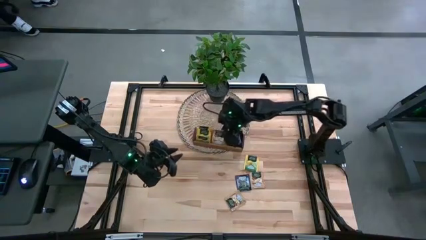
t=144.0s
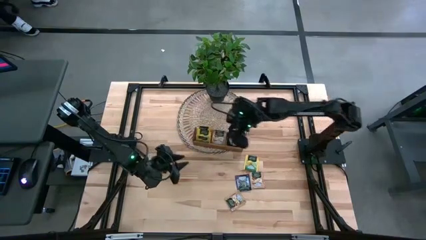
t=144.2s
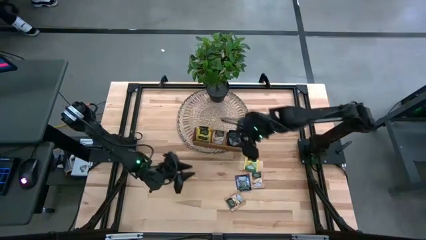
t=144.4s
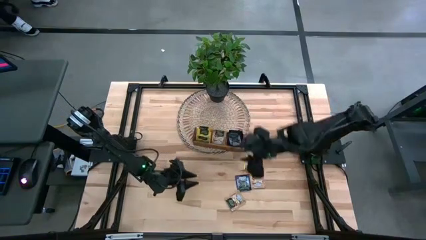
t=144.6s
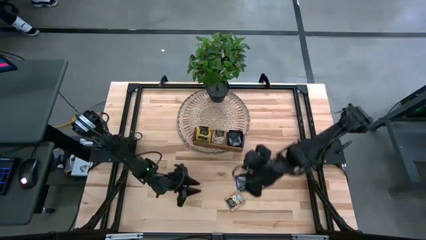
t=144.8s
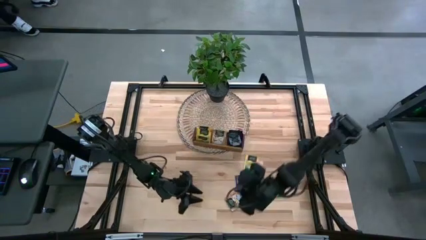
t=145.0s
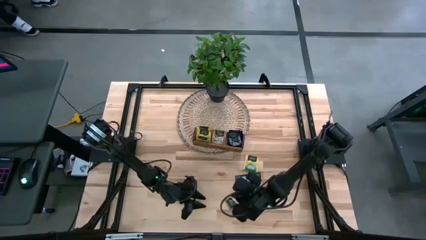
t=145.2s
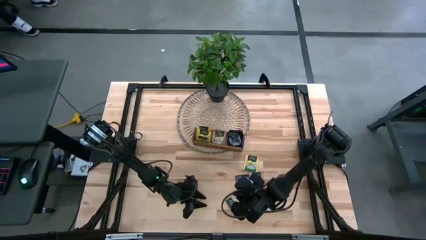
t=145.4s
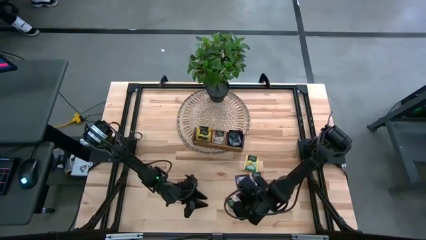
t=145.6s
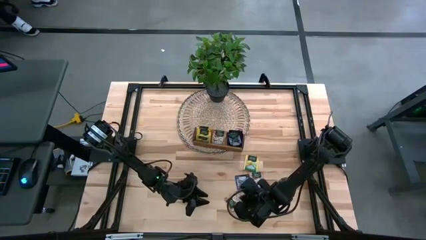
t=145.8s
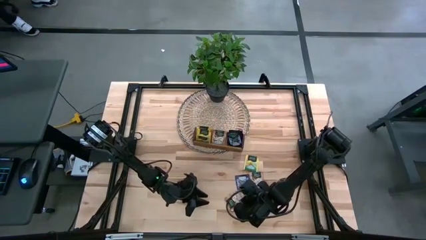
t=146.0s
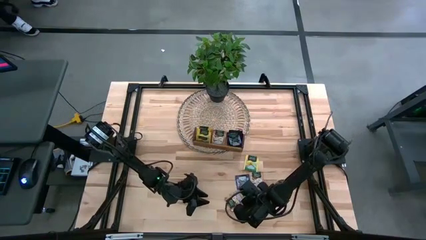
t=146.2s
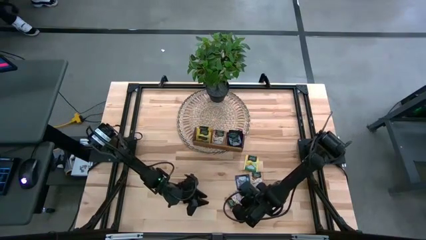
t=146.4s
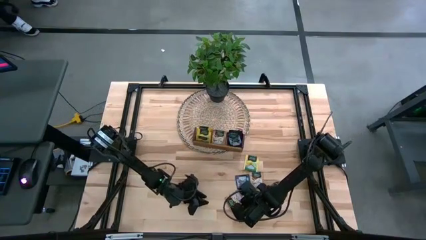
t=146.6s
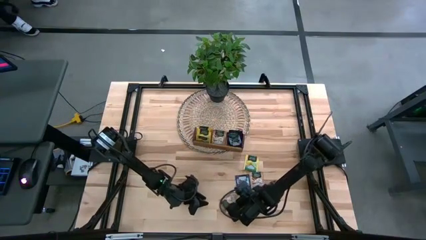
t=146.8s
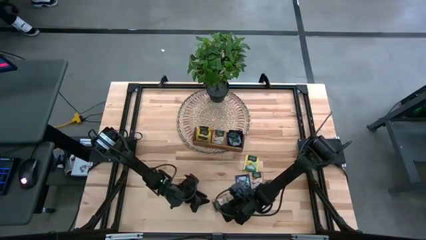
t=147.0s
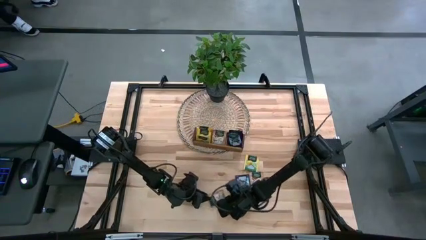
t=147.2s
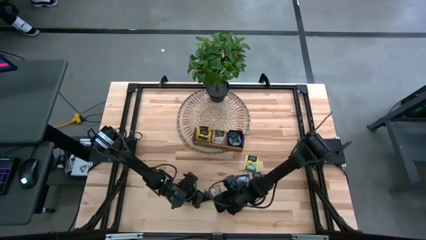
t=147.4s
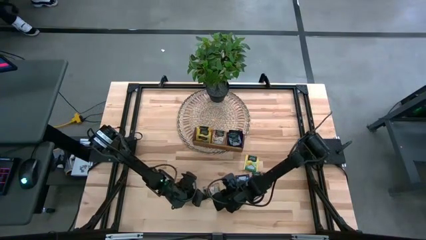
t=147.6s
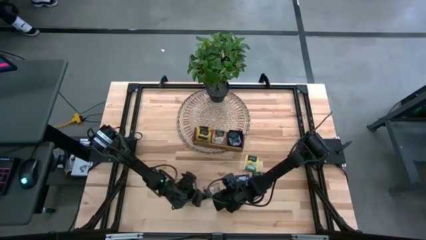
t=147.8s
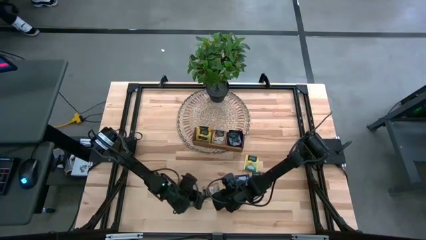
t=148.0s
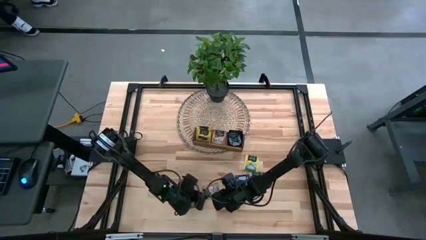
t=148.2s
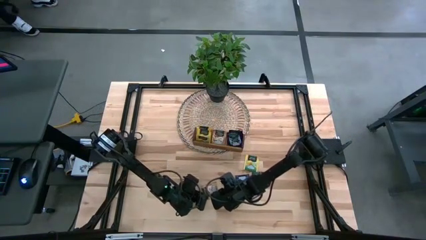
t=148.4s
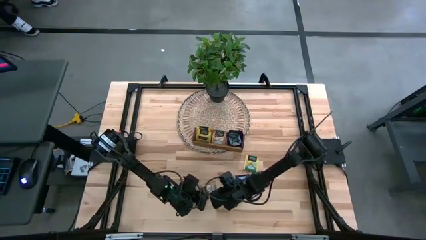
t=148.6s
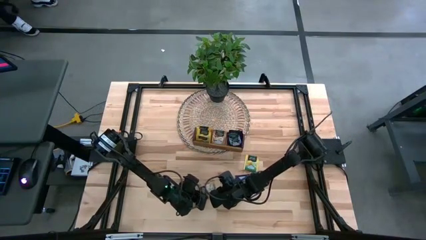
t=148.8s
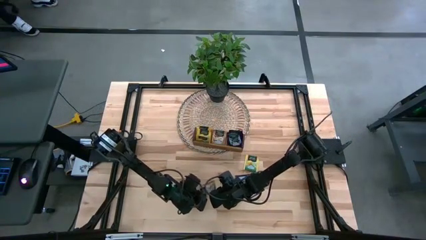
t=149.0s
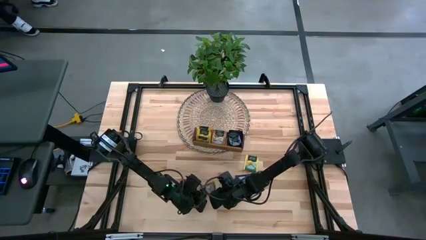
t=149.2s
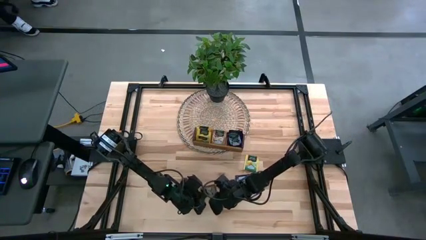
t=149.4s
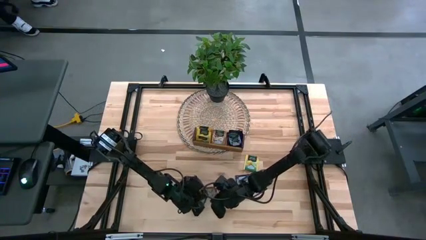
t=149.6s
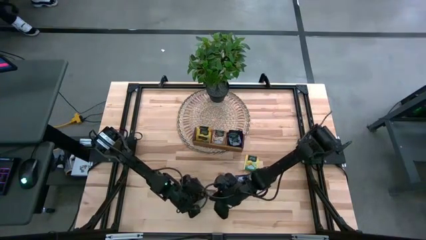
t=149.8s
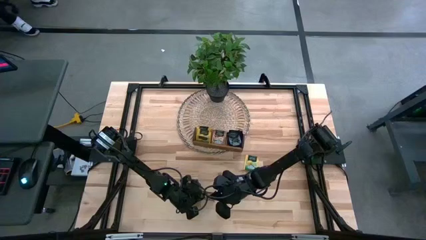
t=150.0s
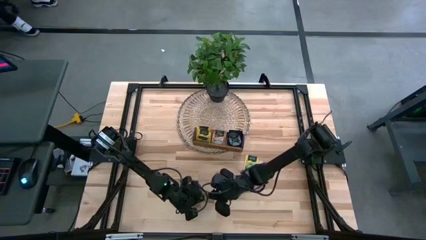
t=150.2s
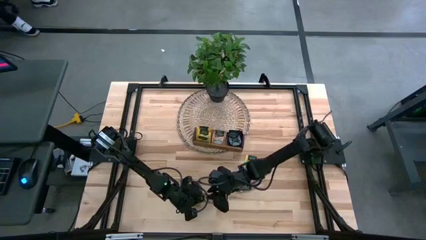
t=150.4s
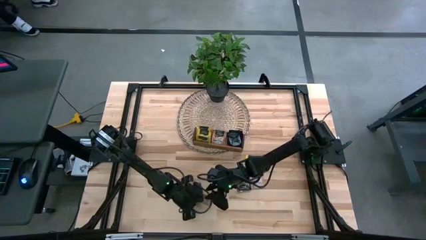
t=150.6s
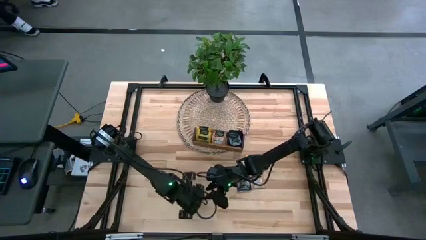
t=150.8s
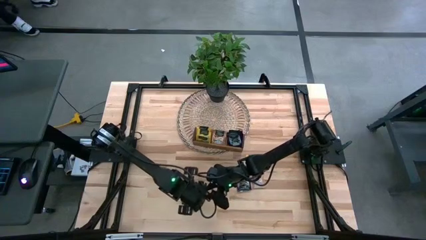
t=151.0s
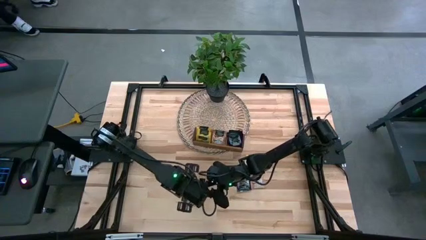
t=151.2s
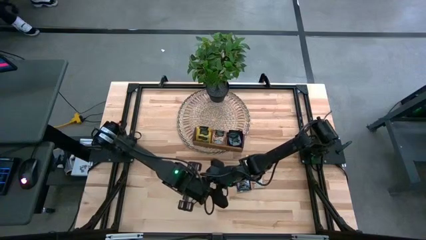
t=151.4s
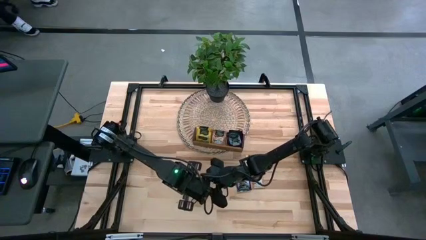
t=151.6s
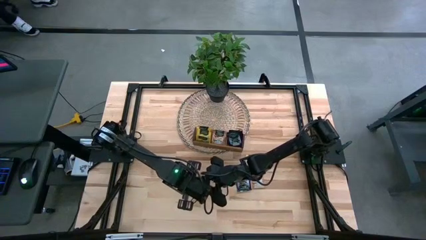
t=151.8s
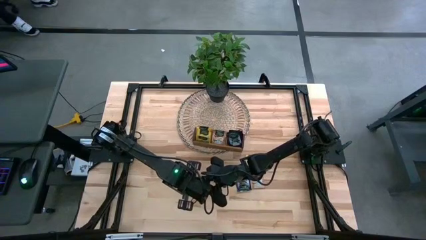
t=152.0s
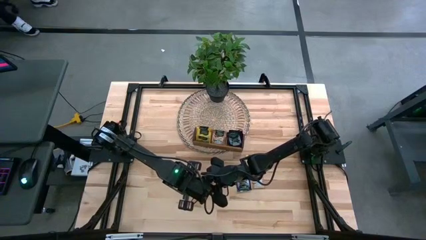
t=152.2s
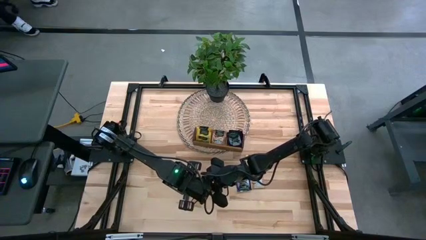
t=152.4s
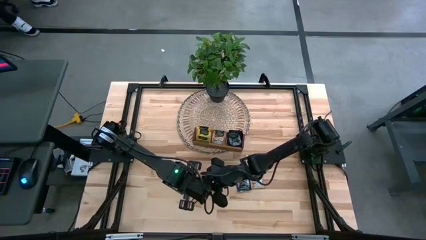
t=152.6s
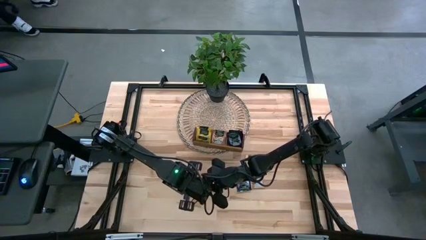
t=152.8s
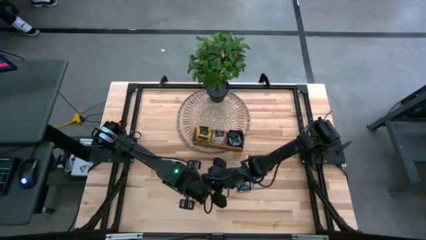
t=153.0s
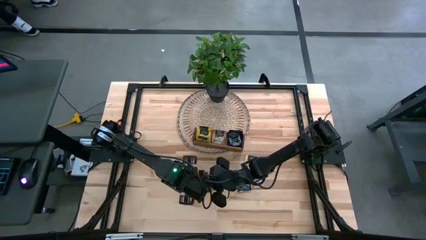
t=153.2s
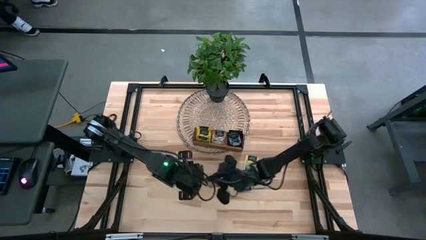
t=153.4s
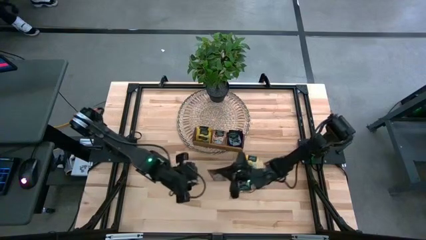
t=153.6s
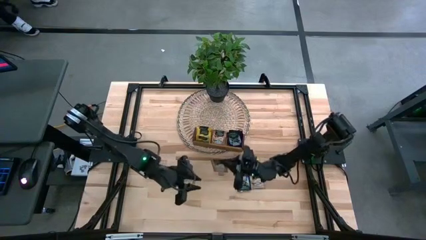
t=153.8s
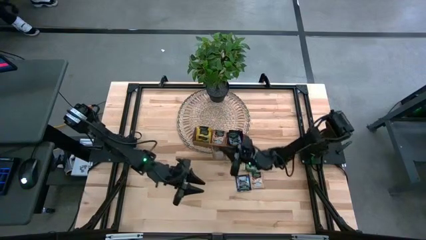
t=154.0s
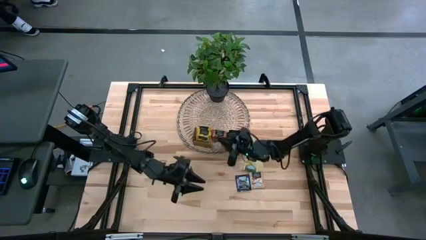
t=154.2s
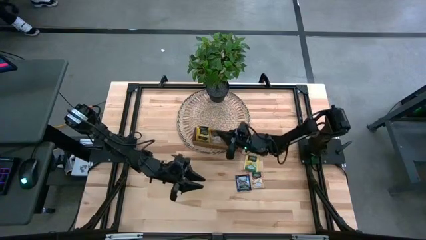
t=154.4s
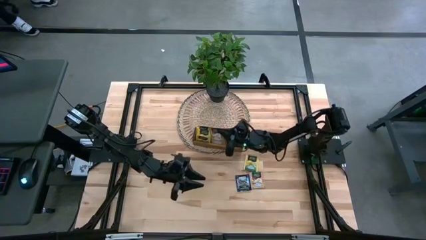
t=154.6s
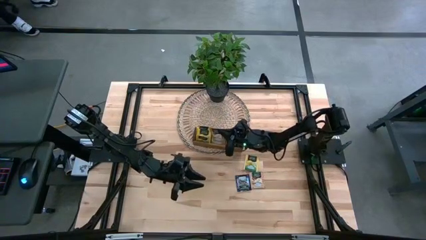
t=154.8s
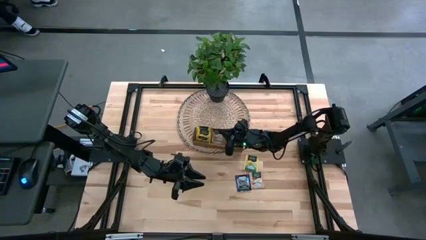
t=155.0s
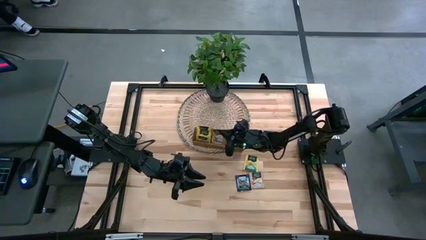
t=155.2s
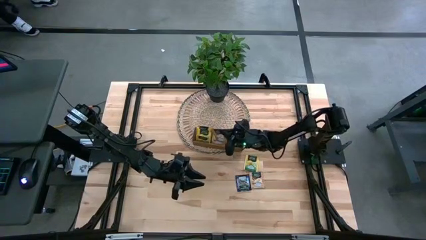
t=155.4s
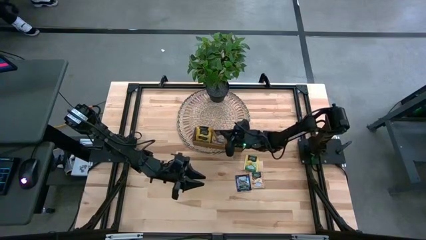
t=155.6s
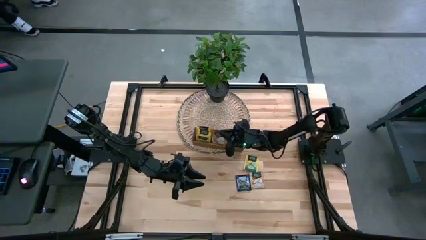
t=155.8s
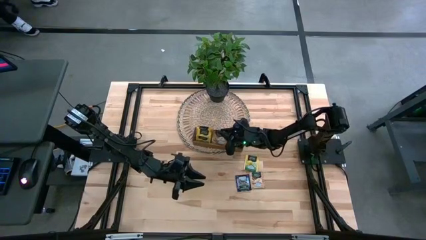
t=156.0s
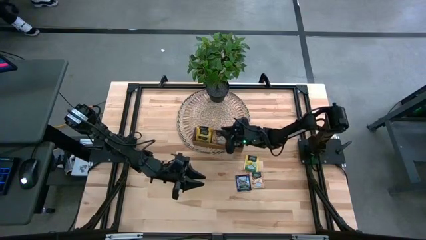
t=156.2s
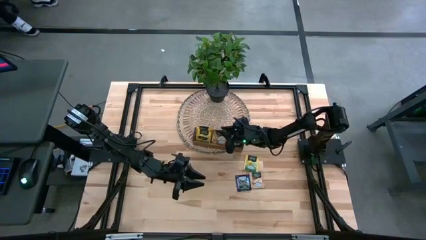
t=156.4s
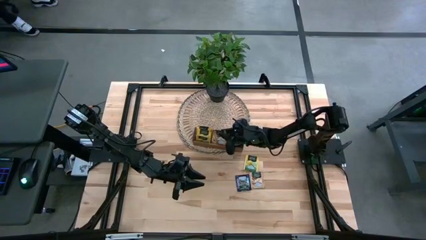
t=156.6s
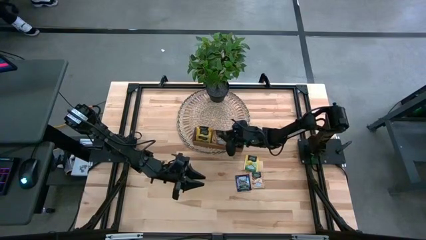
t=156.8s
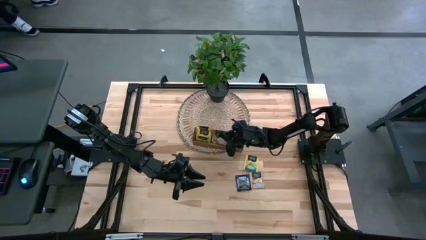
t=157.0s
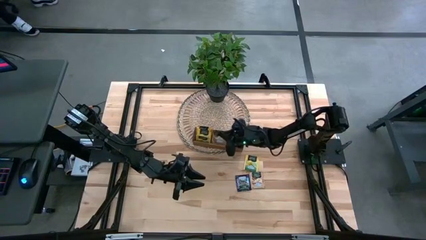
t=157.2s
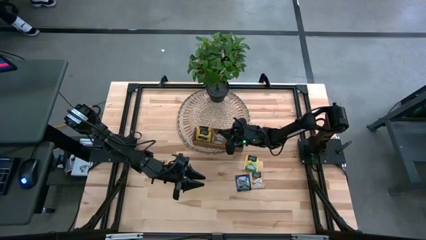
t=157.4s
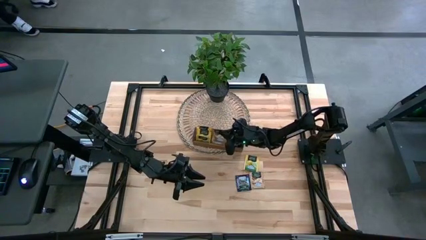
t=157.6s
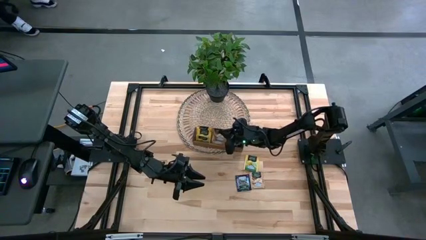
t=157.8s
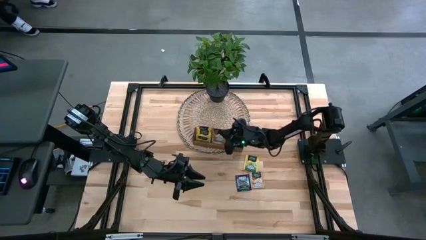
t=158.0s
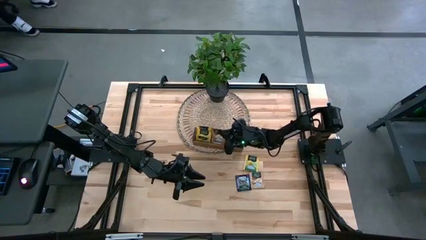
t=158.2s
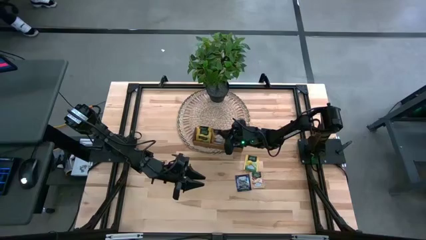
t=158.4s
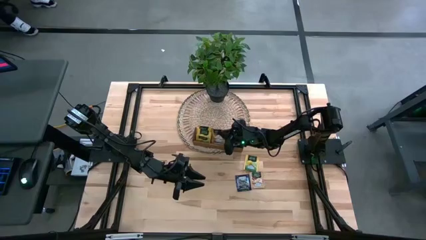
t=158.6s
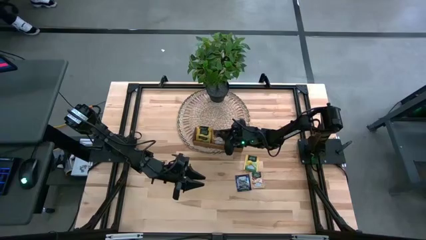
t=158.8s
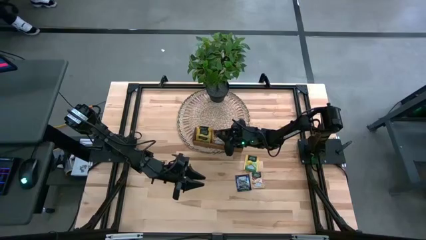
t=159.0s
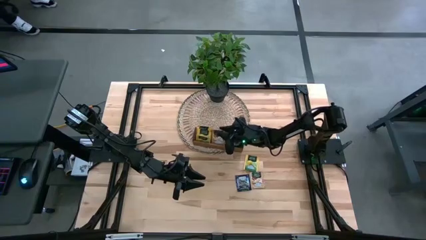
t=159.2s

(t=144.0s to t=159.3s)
Task: Pick & Place Tea
Put the brown tea bag into the middle section of the wooden organizer
